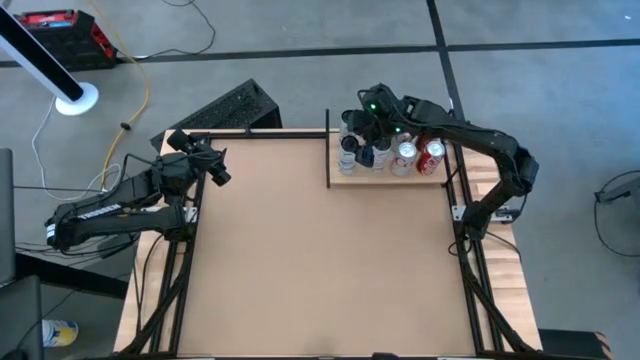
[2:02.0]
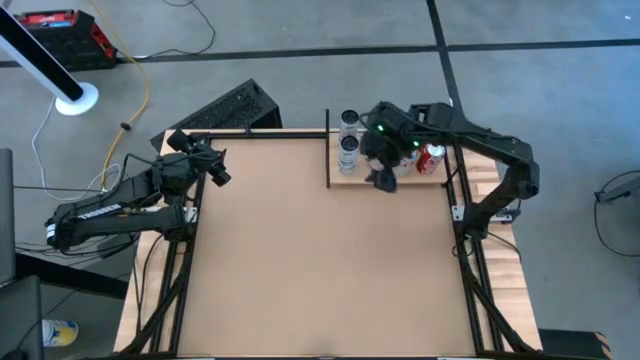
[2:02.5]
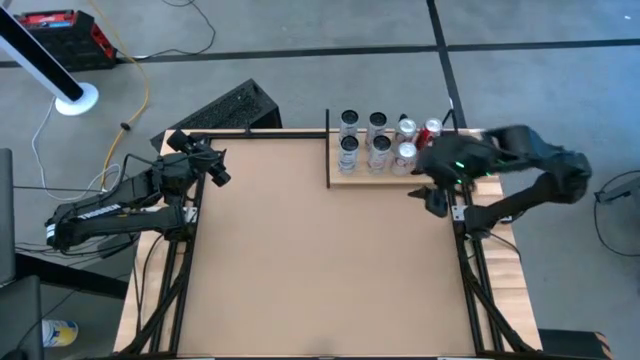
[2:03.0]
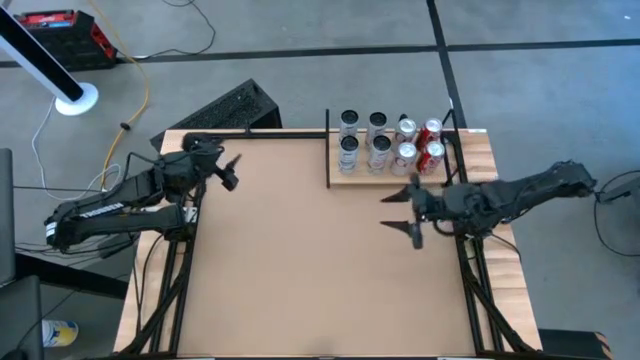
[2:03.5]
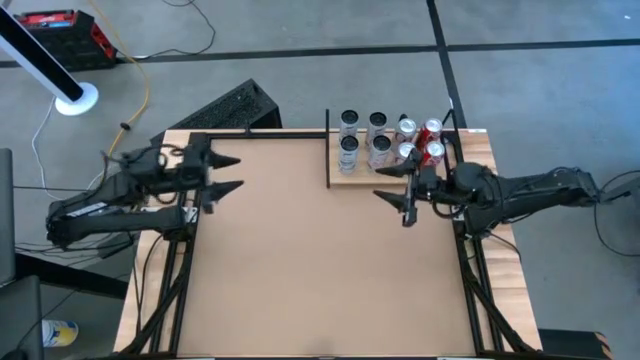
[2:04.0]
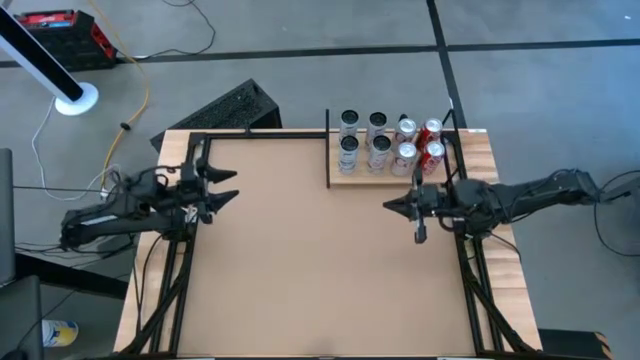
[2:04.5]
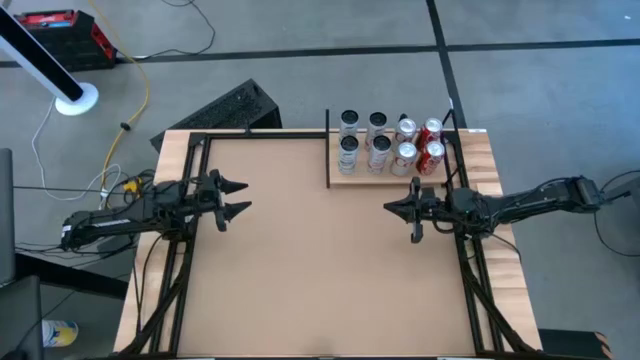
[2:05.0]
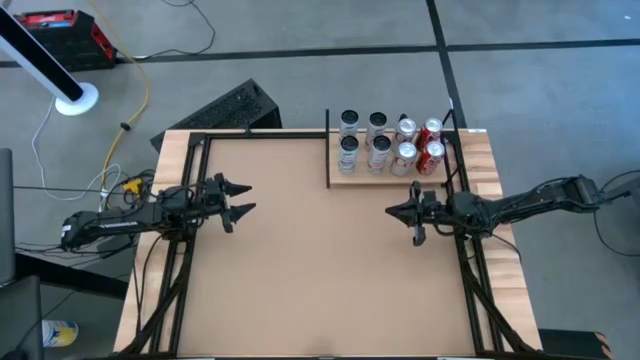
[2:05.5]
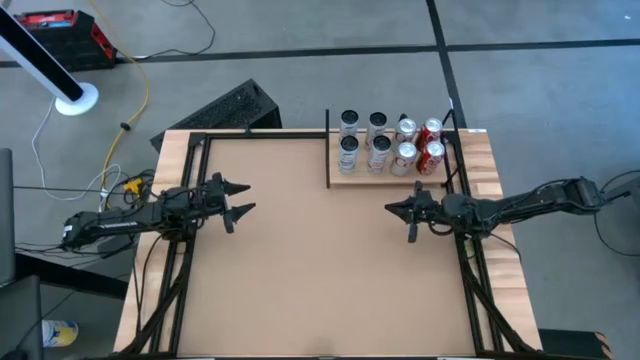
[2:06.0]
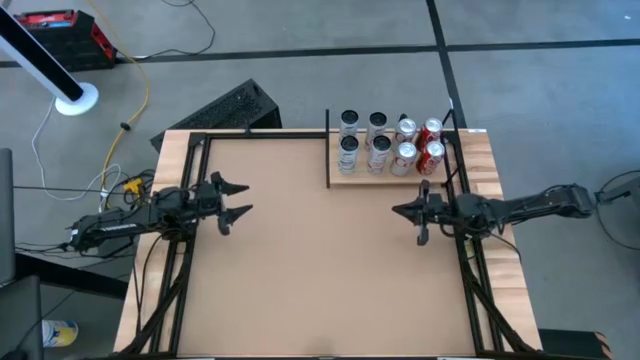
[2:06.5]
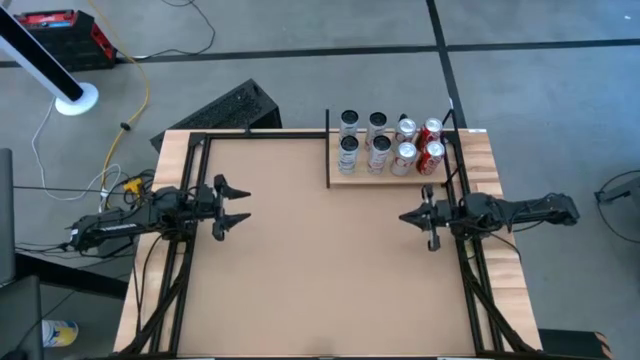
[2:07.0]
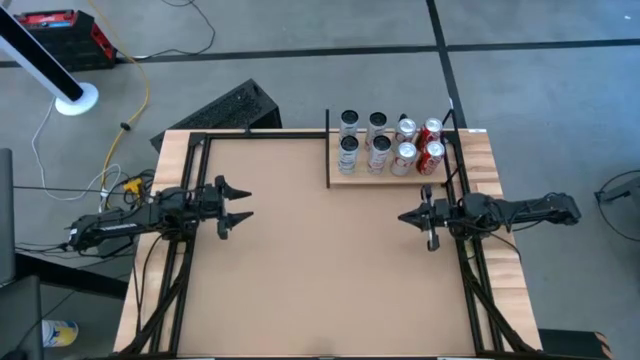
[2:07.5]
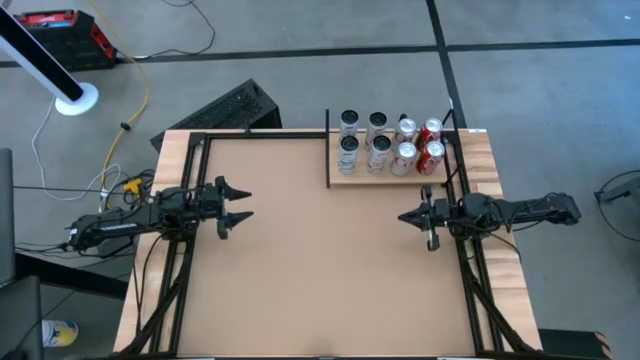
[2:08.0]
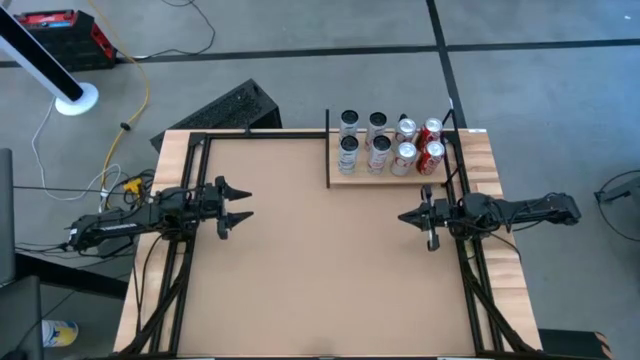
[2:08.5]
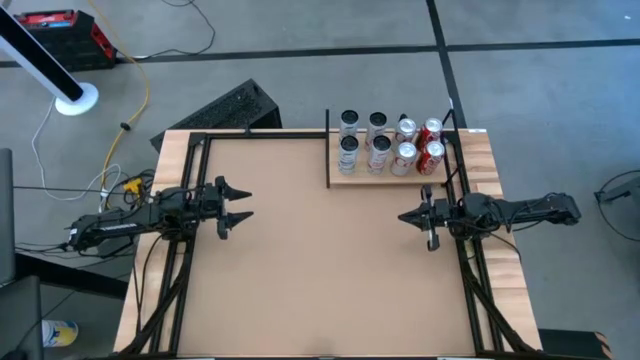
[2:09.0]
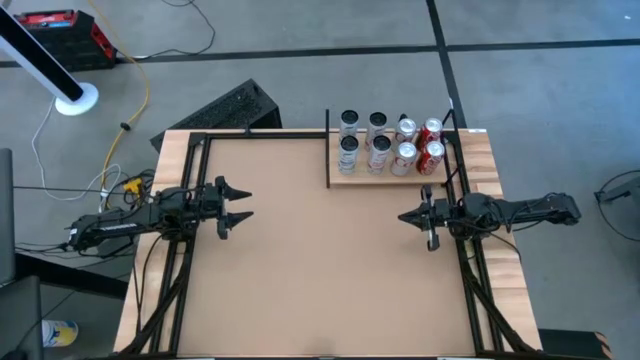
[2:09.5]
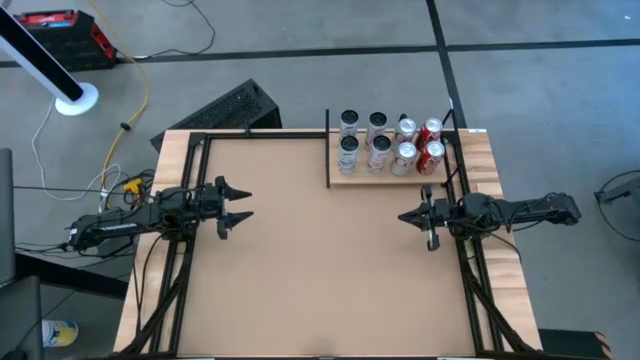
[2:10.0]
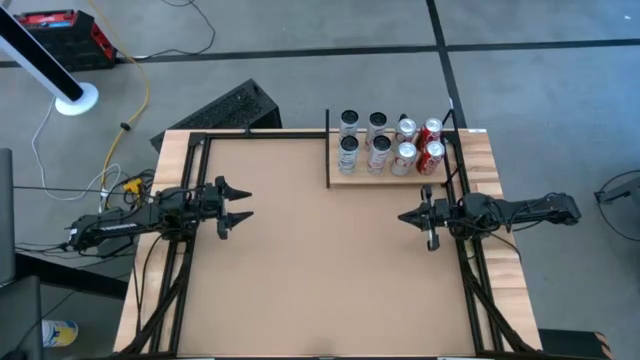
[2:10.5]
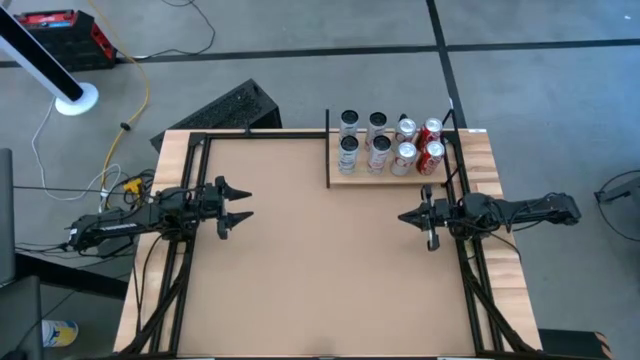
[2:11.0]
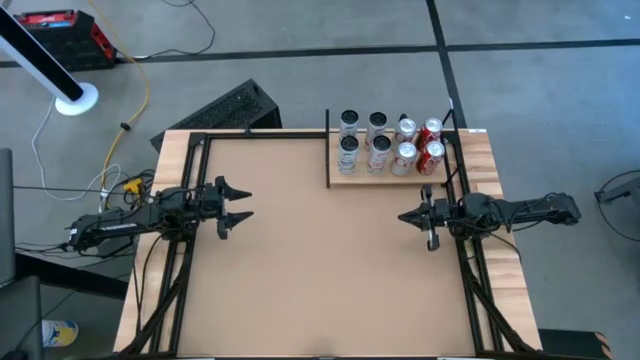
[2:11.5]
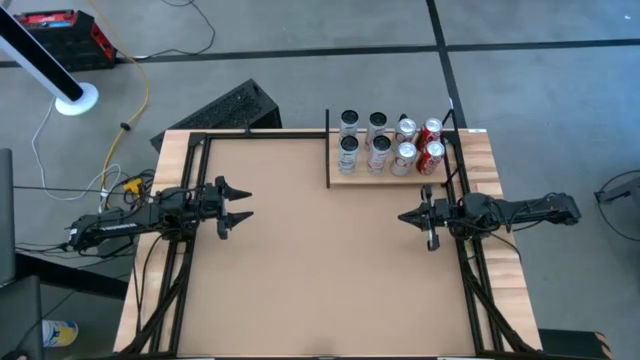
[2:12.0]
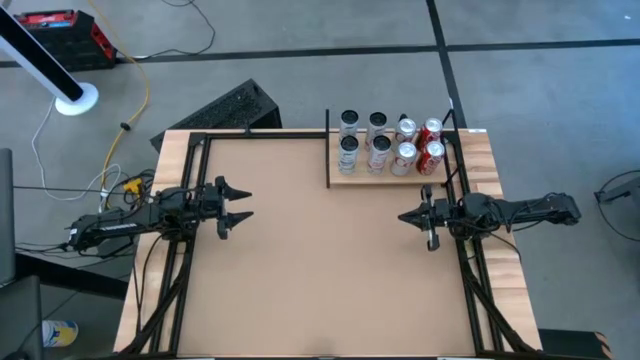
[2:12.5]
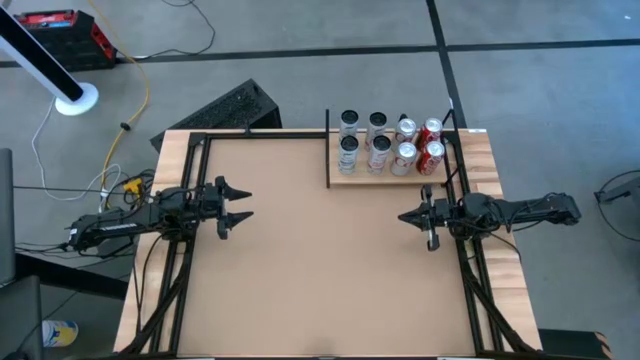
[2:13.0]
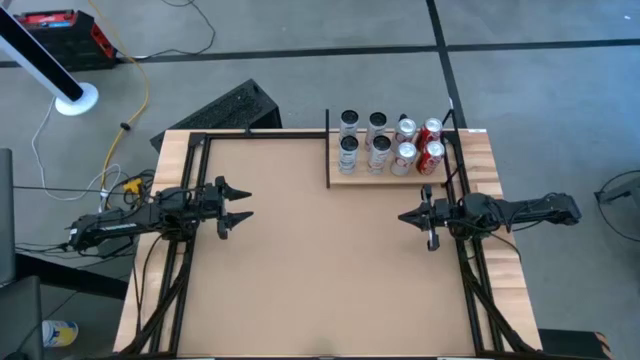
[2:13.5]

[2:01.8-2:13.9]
Task: Place canned beverage on shelf
Return to Home Position

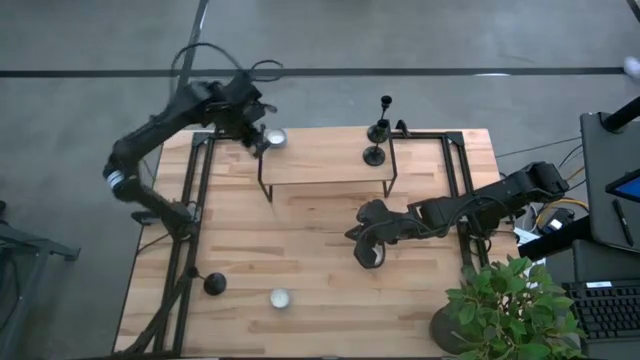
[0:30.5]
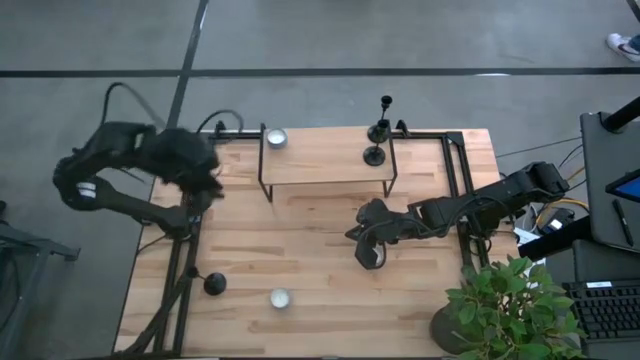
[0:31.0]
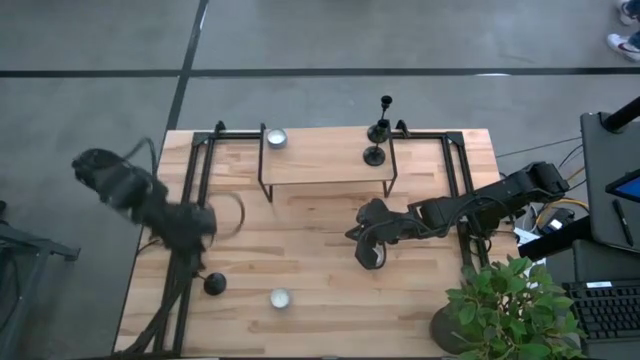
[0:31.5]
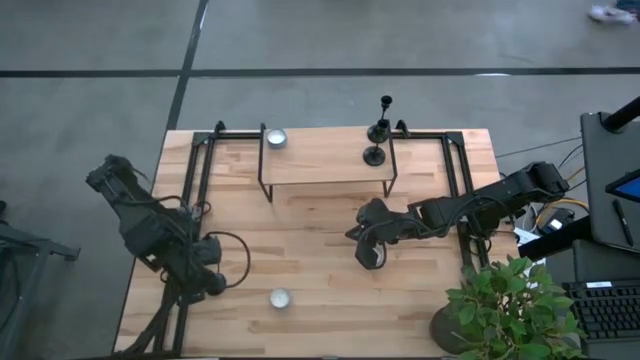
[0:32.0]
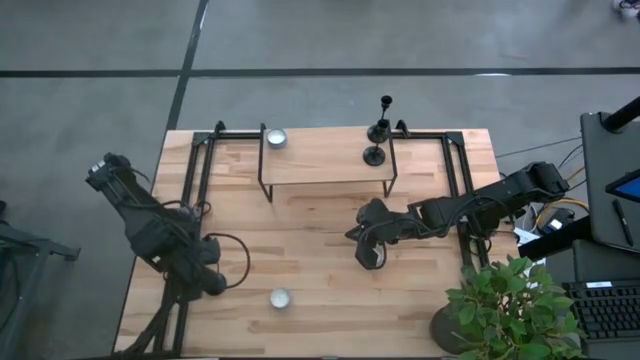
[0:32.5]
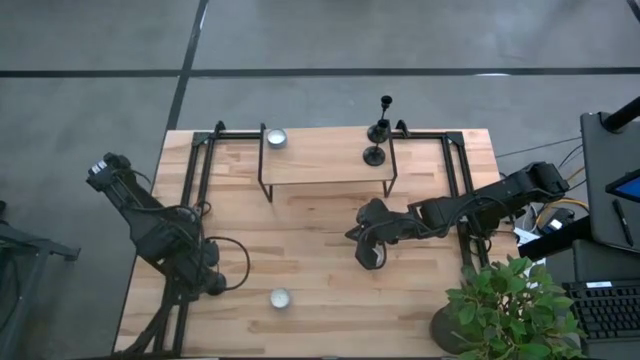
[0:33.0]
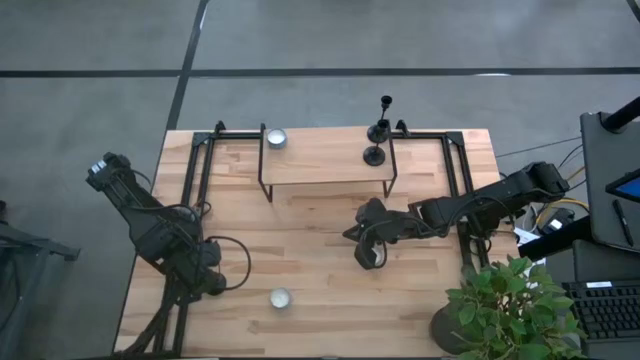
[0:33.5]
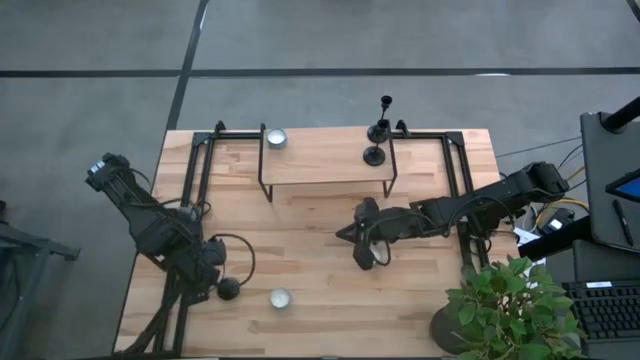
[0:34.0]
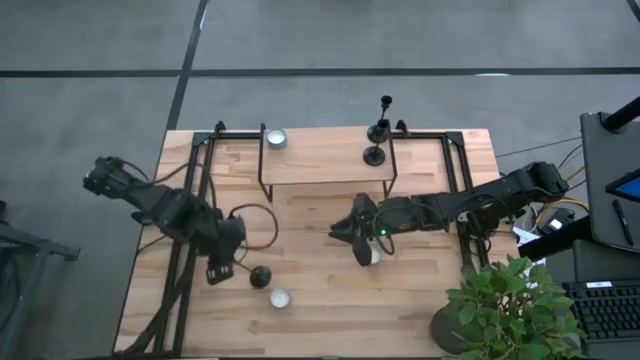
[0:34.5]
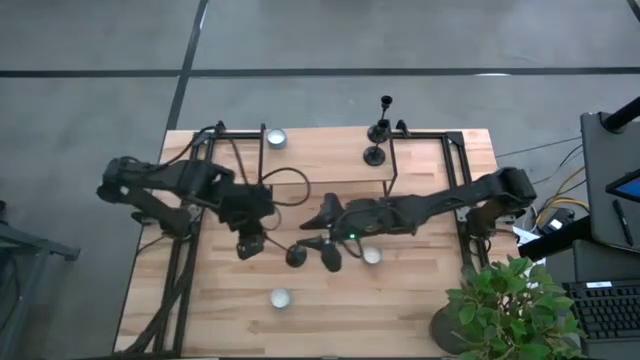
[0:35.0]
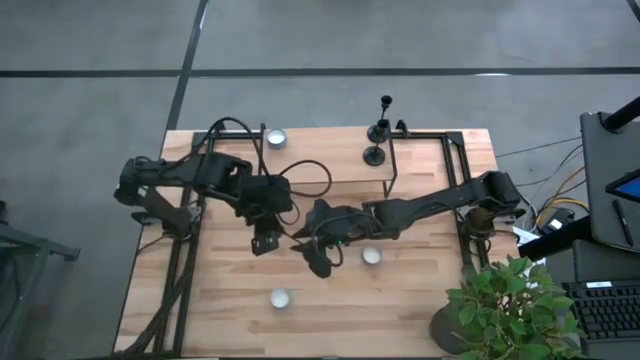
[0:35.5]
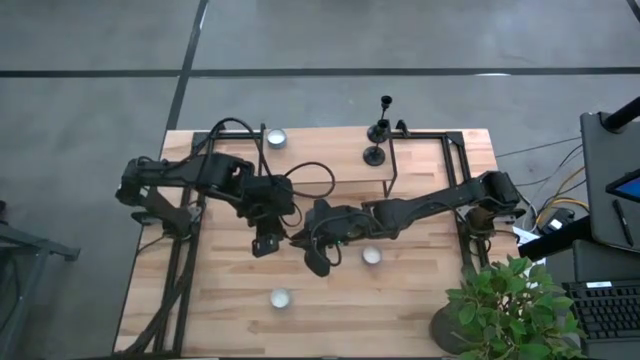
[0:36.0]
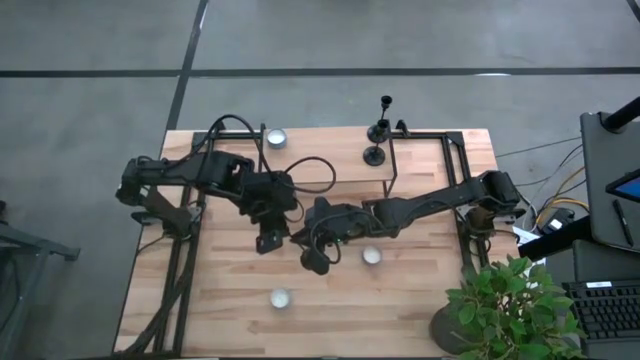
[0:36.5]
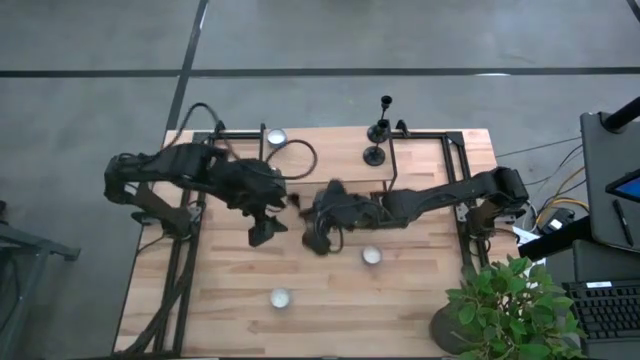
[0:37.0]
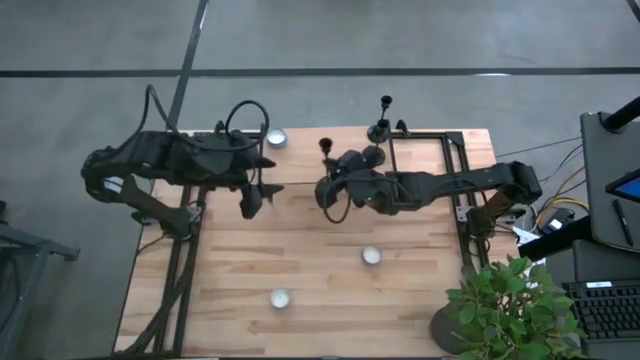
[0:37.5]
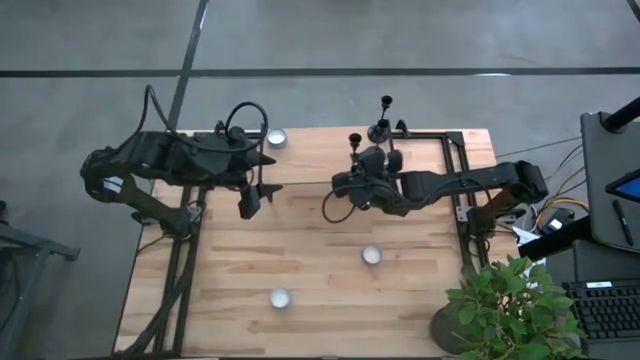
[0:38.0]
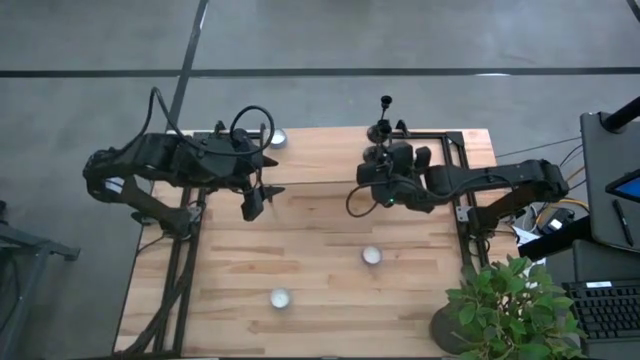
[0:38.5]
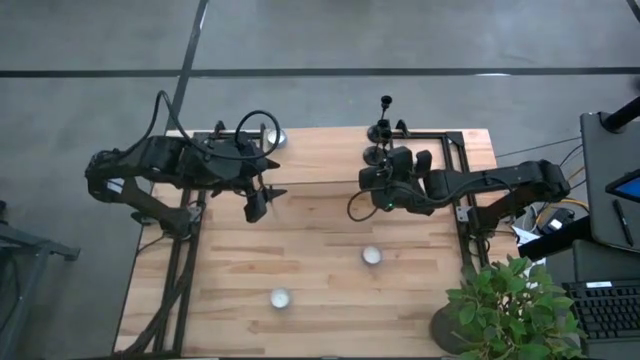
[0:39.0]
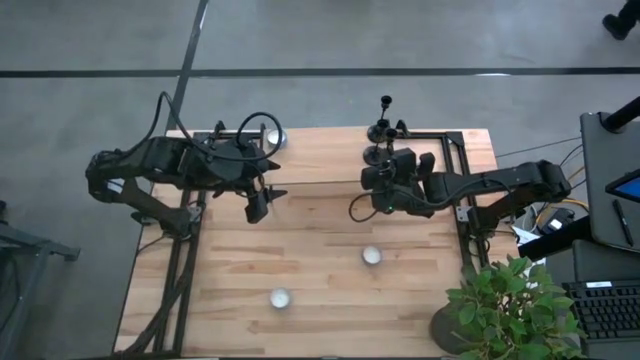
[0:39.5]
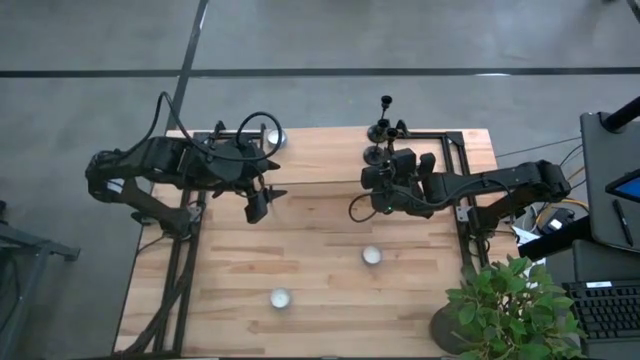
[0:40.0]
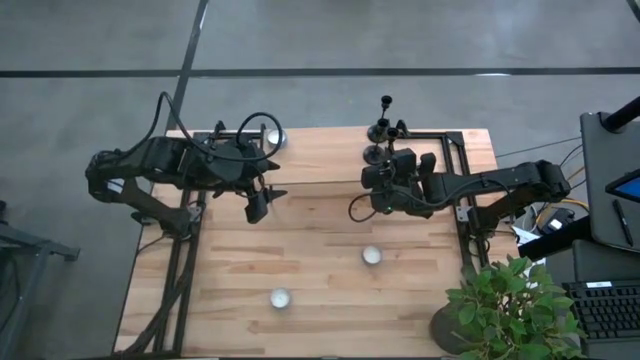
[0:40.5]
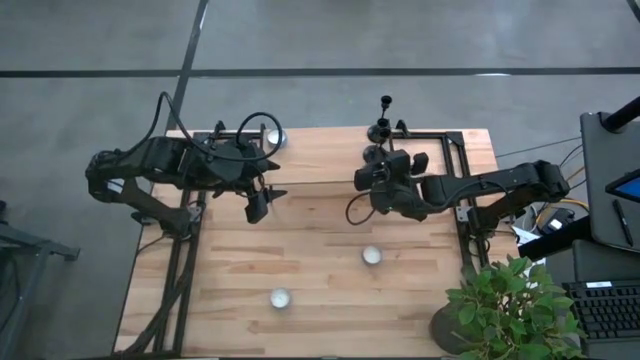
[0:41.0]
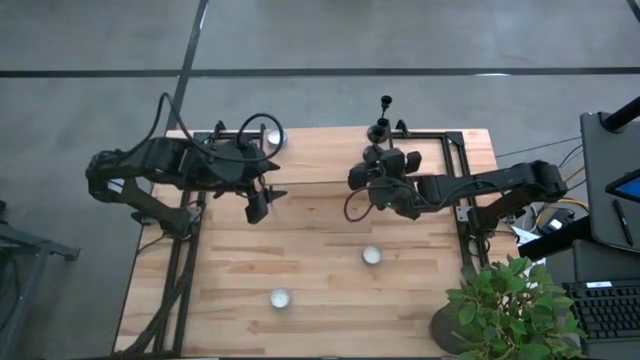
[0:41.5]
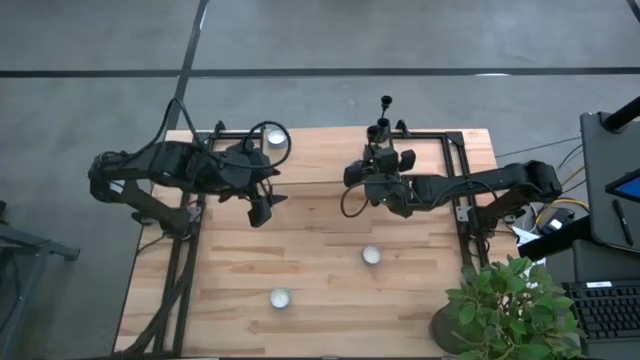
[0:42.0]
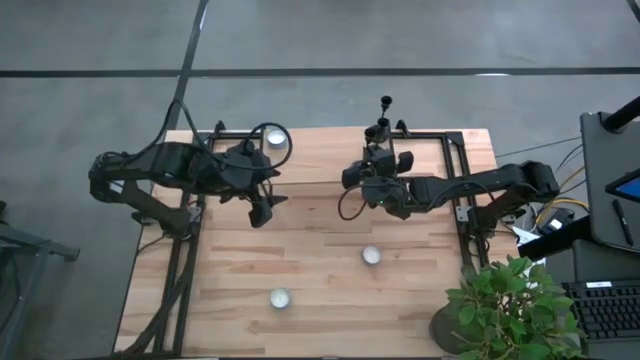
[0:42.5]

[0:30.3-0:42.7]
Task: Pick & Place candle stick holders
Put the black candle holder on the shelf aligned with the other candle holders
